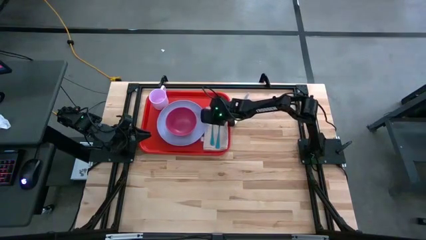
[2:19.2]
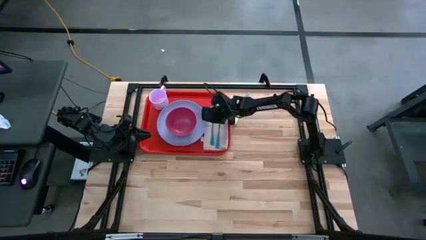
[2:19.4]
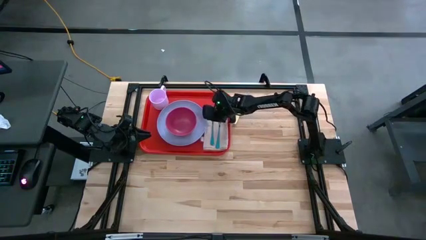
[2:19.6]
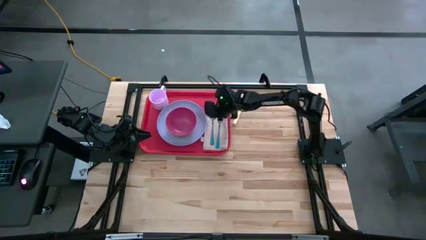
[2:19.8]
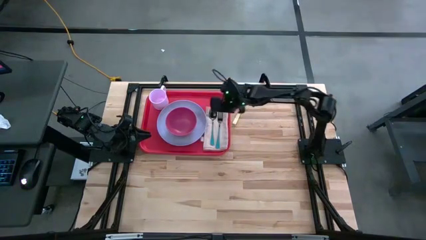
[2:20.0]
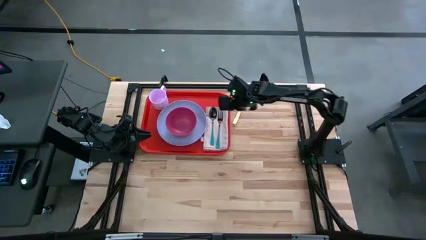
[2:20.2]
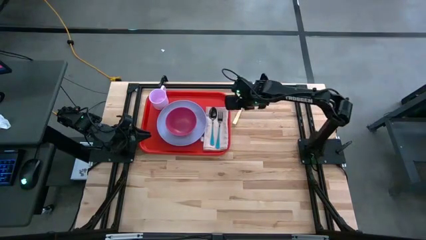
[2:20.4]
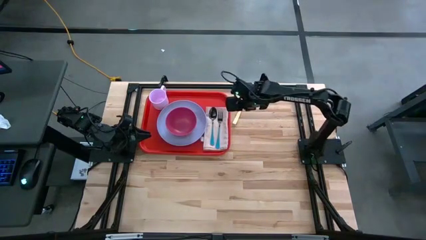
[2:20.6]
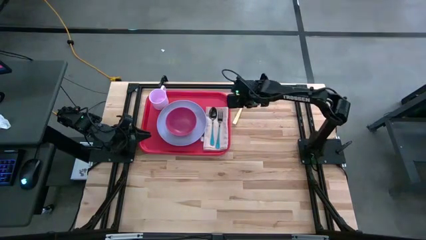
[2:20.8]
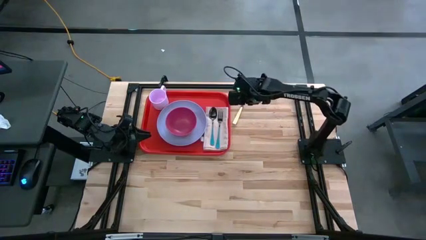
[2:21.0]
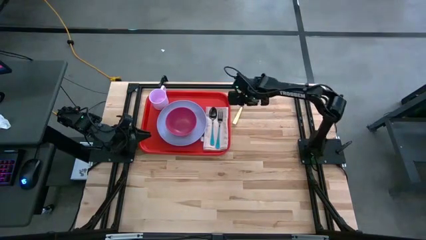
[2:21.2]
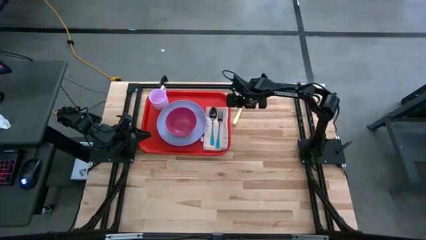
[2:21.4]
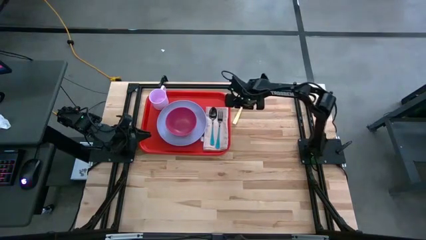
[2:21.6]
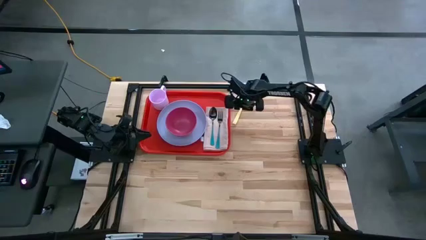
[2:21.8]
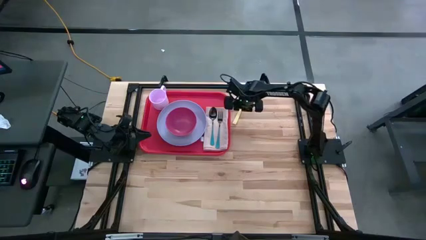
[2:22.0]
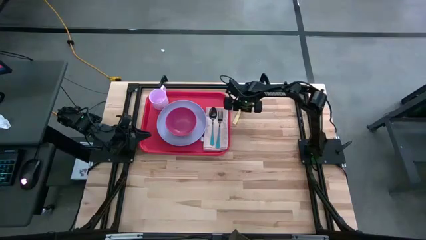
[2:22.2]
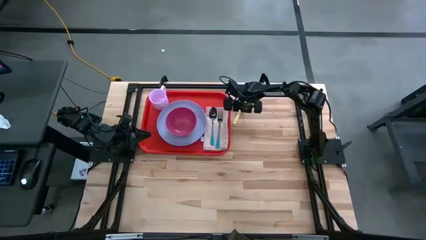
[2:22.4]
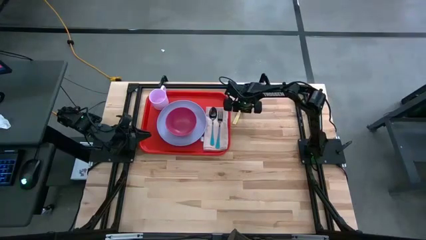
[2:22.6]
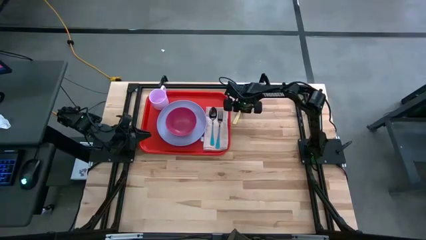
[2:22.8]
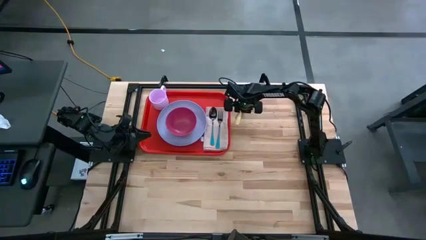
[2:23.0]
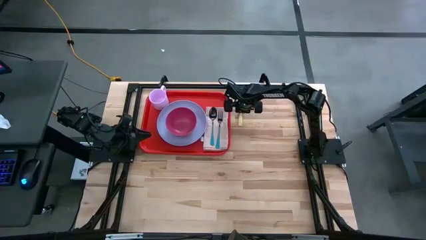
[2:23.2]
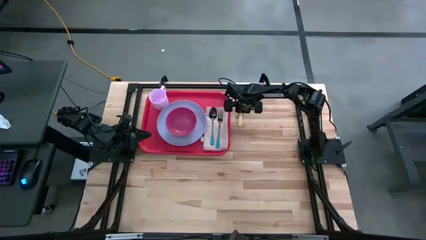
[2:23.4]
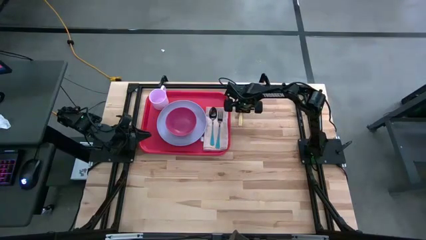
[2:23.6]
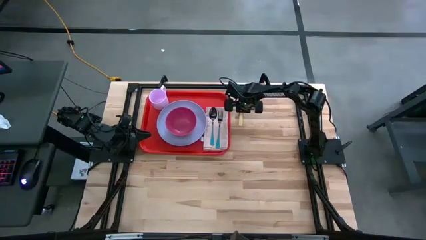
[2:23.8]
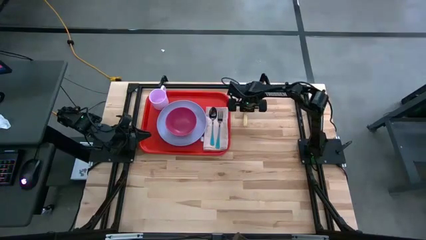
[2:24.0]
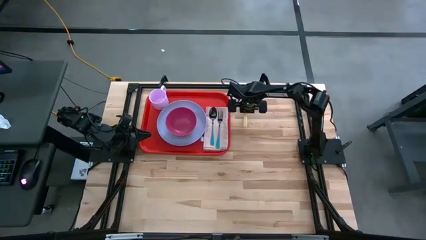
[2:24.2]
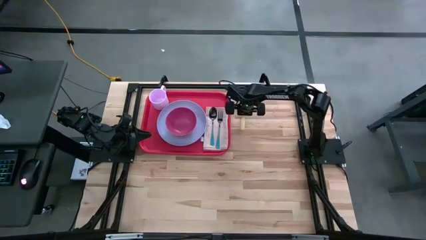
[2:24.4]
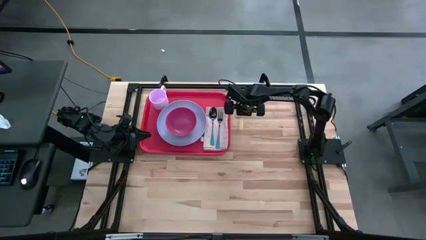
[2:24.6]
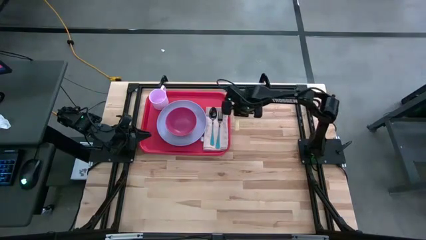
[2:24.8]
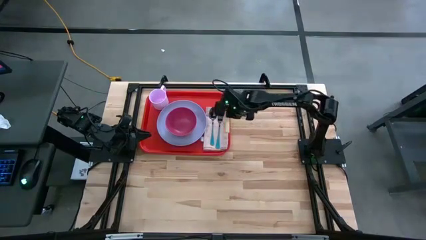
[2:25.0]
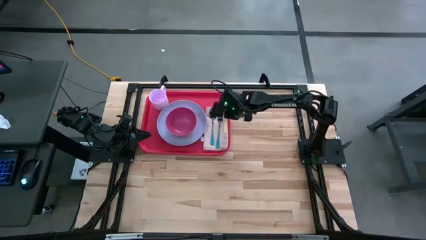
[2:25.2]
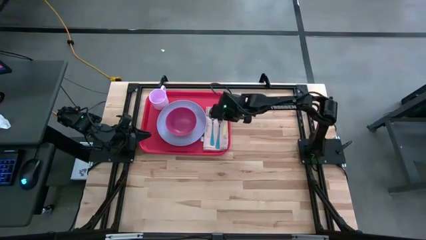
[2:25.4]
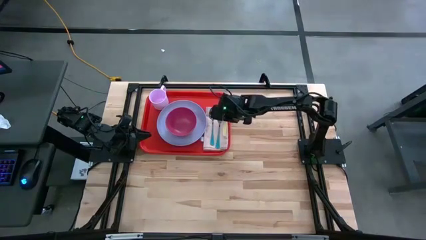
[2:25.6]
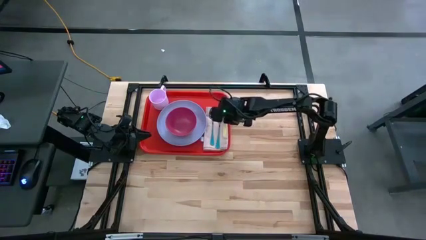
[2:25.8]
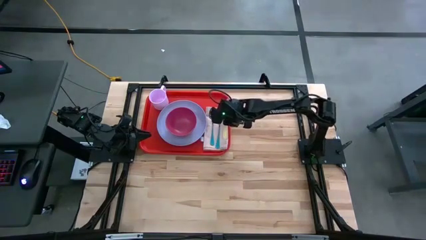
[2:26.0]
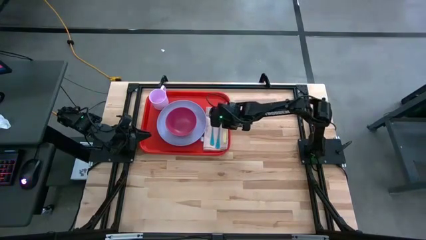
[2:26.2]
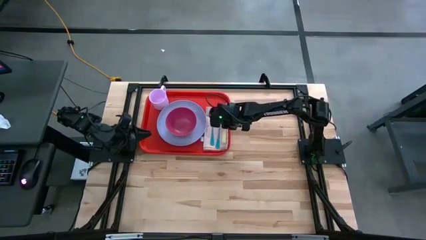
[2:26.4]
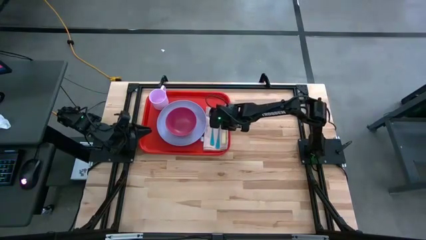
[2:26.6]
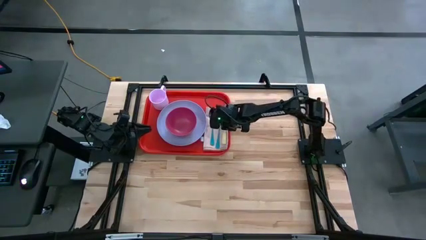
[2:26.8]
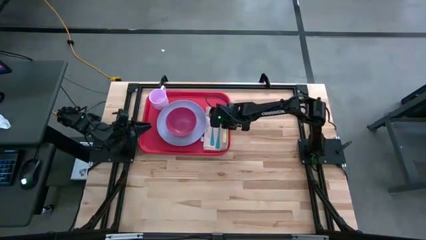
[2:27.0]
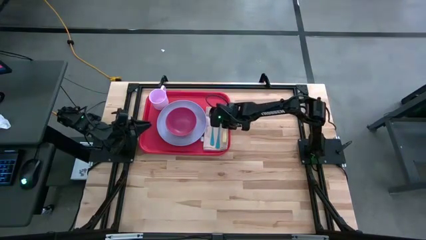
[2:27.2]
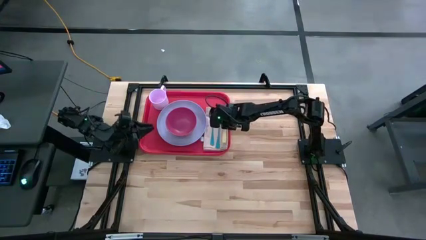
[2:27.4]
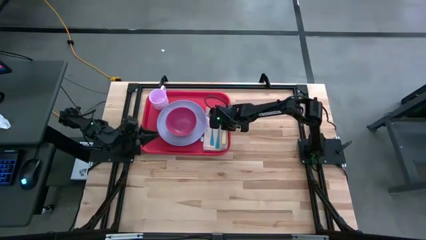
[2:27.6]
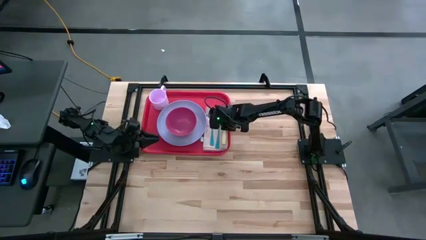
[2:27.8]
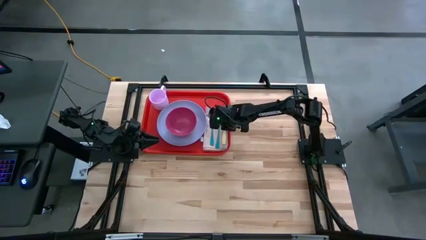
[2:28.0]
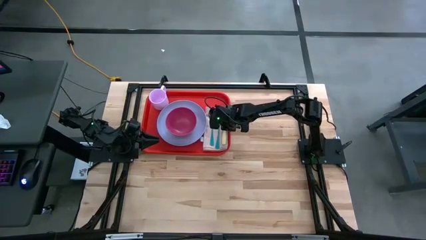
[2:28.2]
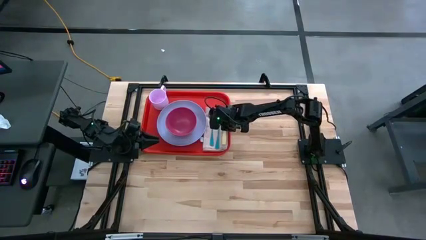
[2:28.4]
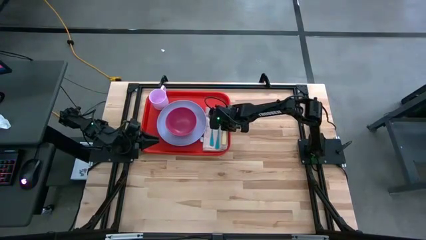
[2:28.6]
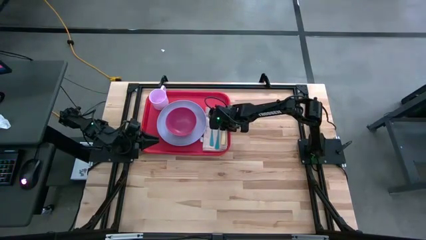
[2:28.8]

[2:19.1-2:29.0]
Task: Set up tray
Put the yellow knife on the brown napkin to the right of the green fork

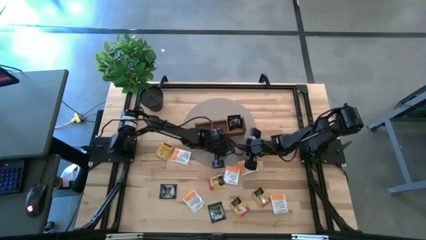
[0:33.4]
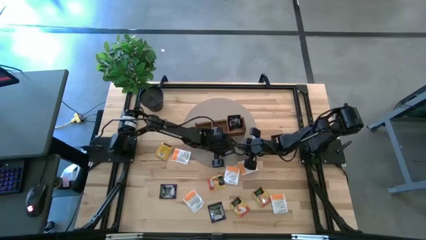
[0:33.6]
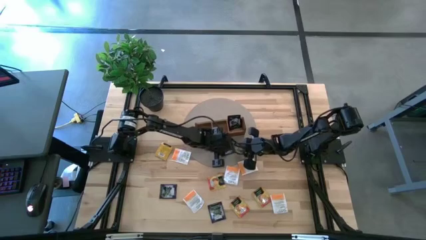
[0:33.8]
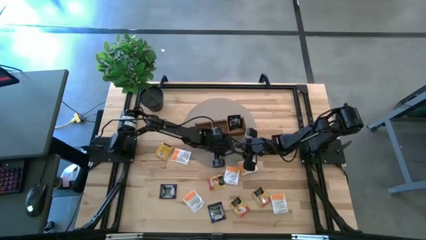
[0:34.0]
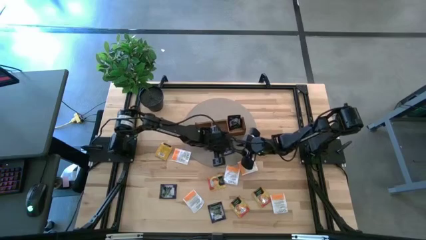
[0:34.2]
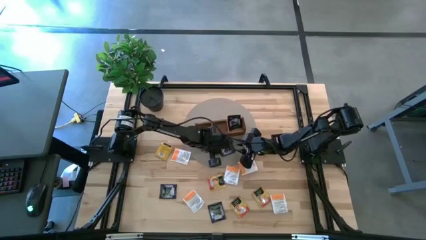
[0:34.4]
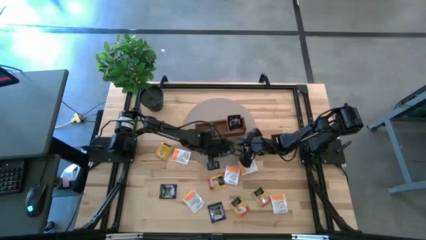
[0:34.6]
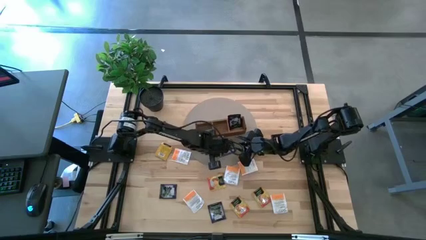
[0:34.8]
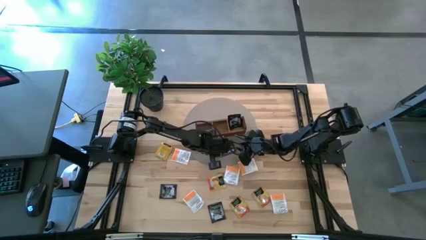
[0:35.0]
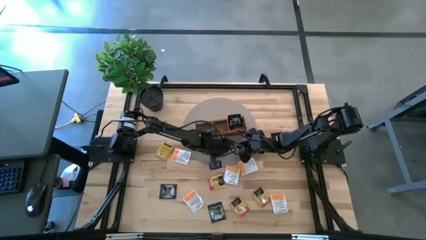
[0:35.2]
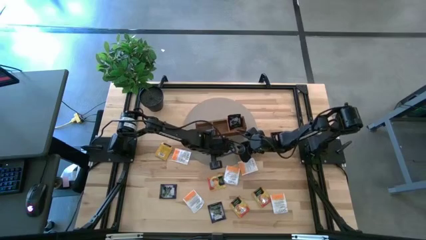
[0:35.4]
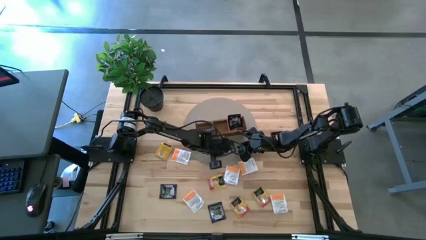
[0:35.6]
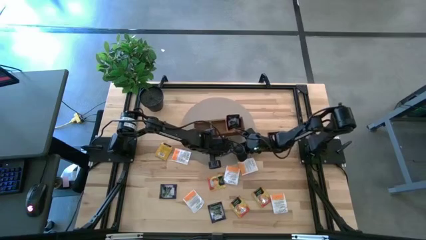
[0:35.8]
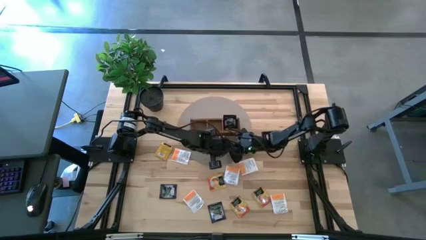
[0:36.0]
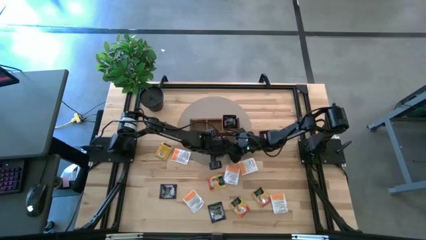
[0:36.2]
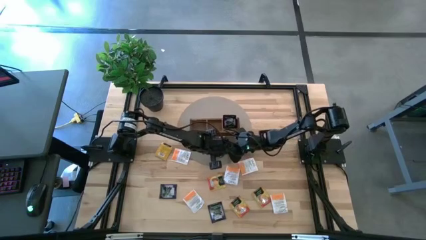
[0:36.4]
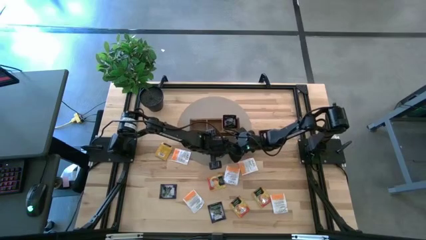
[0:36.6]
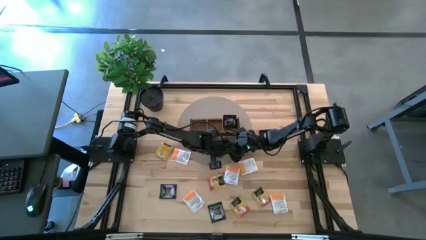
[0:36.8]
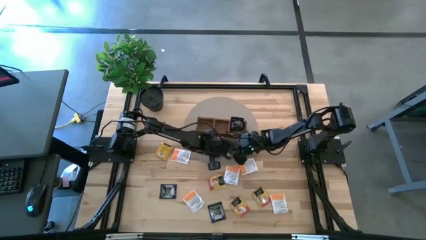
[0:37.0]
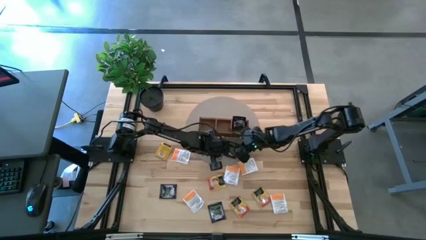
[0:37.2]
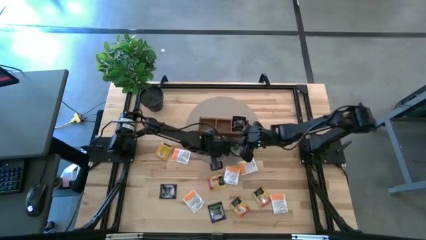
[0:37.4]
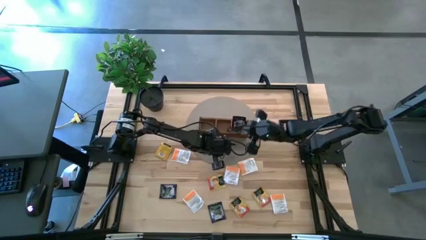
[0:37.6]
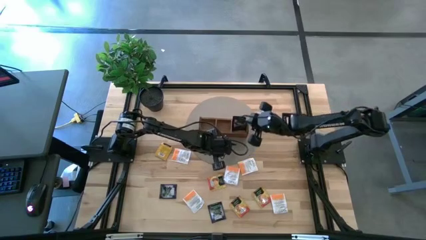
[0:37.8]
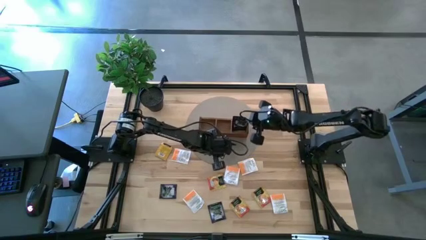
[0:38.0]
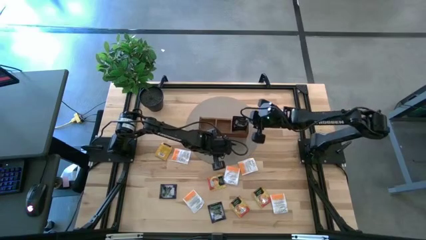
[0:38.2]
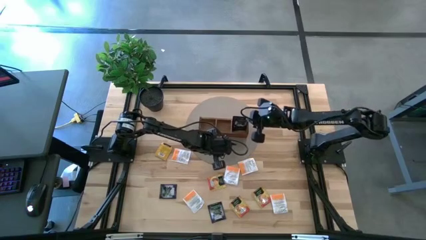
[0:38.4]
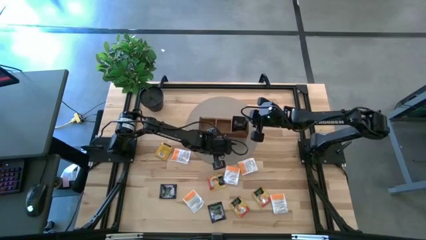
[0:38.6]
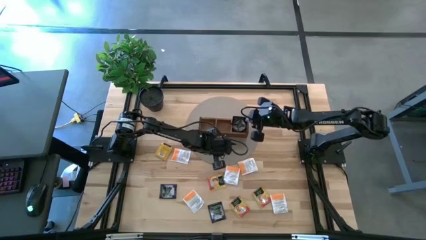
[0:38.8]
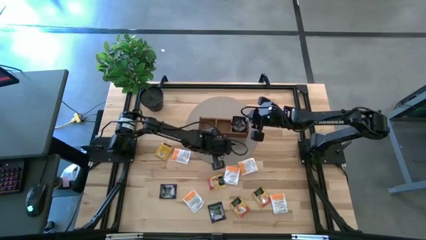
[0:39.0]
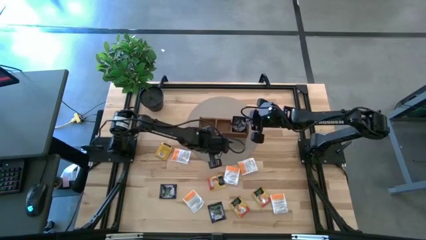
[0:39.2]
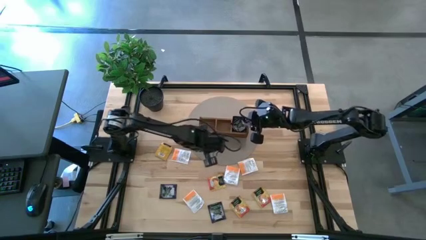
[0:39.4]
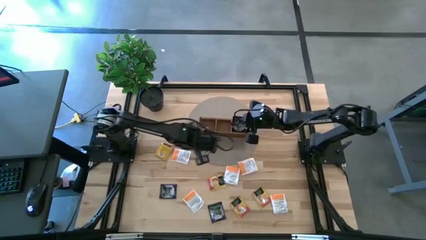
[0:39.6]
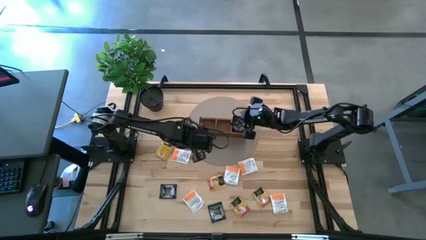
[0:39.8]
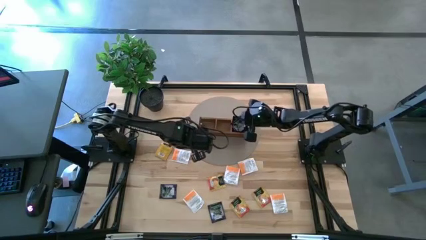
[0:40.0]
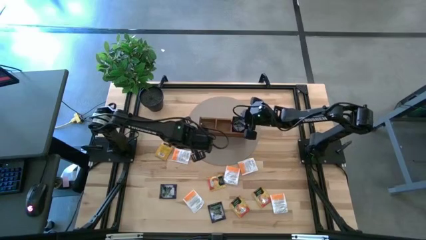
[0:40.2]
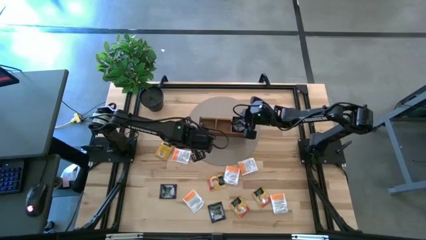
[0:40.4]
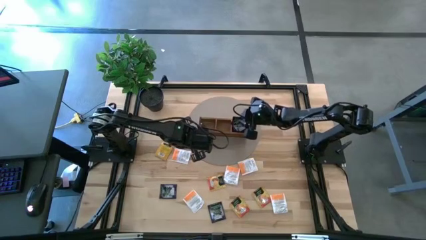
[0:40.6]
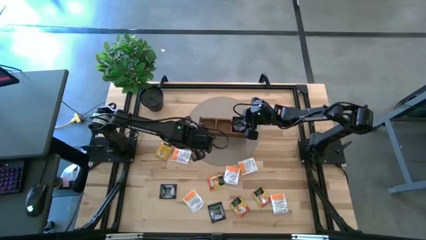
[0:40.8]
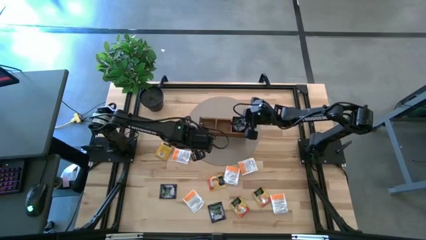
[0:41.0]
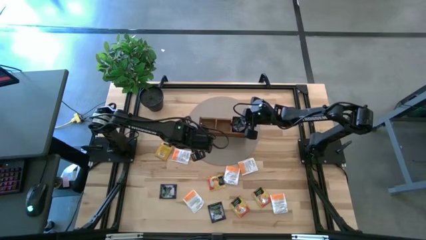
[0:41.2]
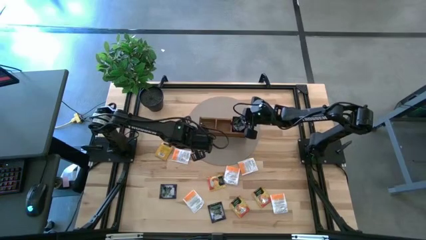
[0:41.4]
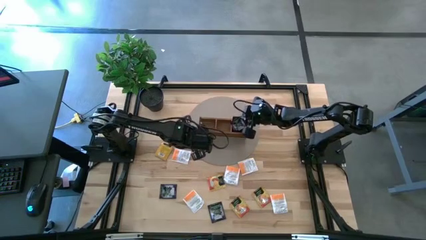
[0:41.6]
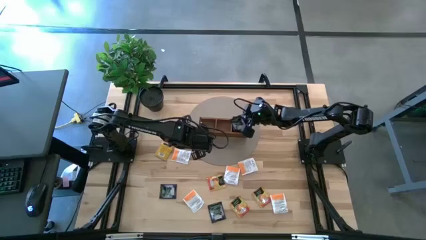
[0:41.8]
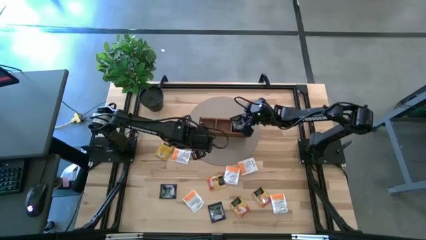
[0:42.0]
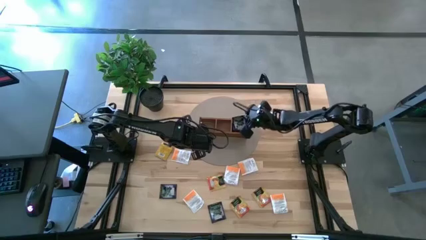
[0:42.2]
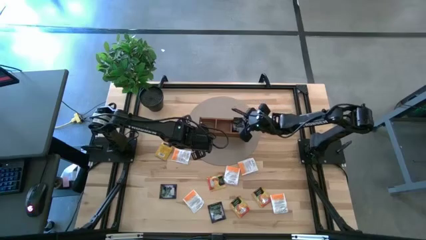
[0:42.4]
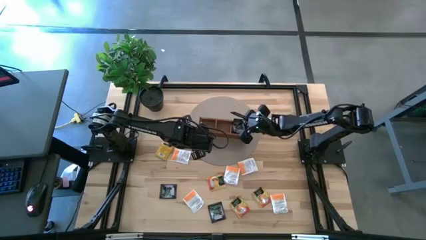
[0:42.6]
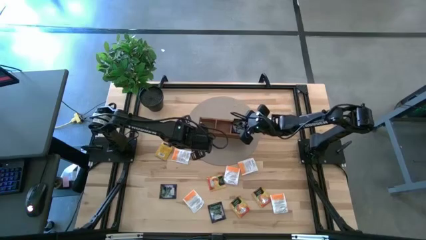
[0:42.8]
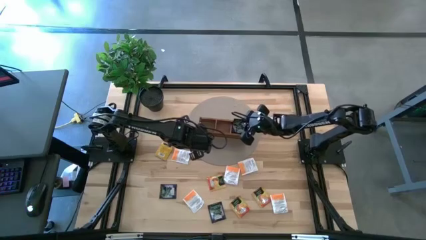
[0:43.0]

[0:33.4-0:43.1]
Task: Pick & Place Tea
Put the purple tea bag into the right section of the wooden organizer
